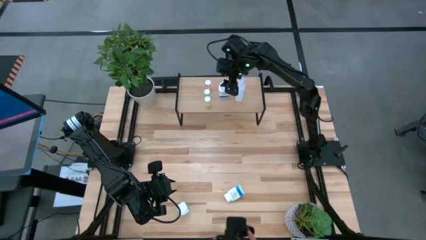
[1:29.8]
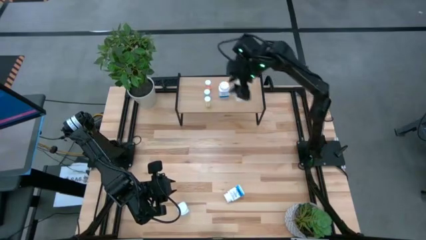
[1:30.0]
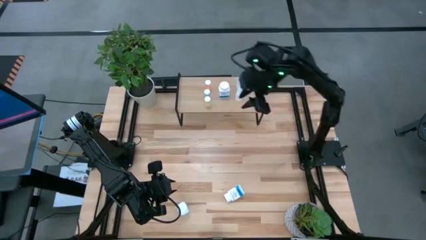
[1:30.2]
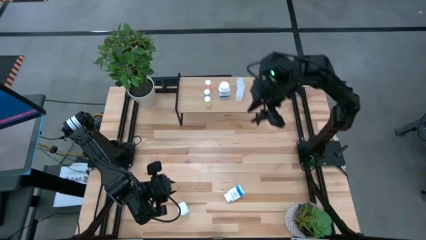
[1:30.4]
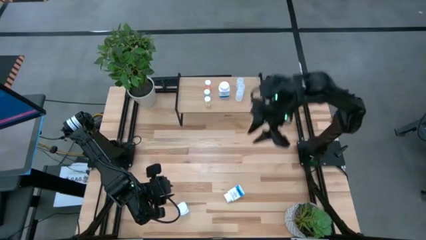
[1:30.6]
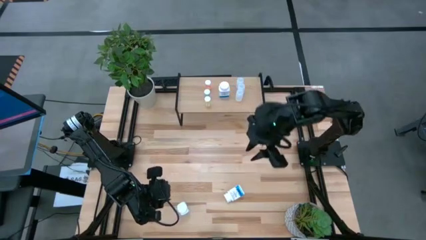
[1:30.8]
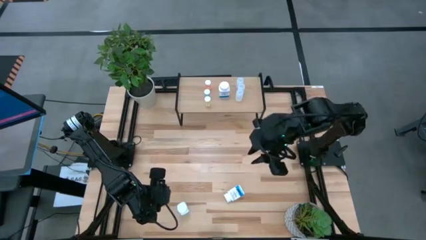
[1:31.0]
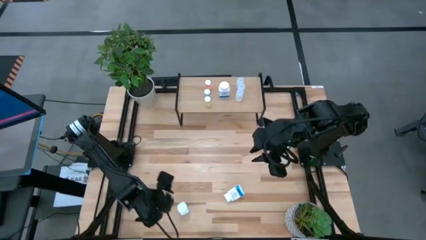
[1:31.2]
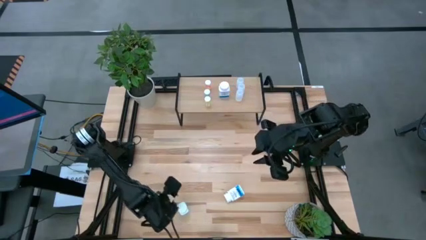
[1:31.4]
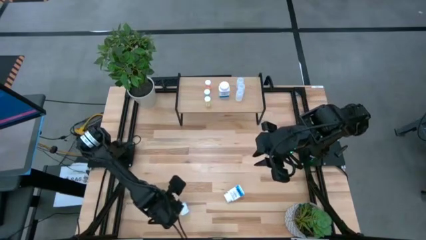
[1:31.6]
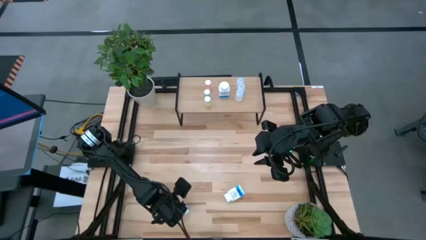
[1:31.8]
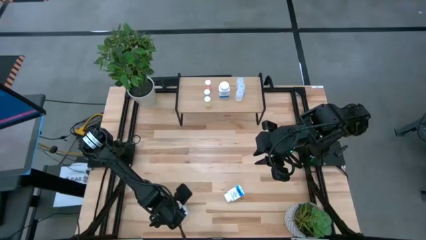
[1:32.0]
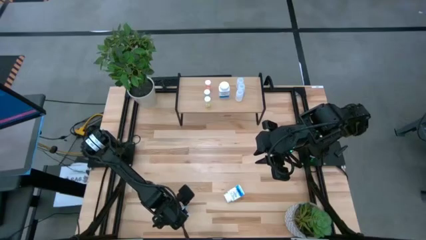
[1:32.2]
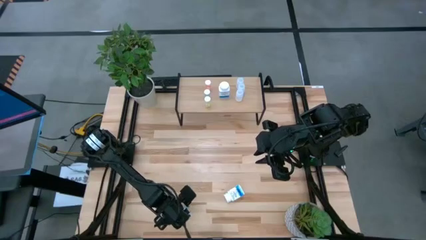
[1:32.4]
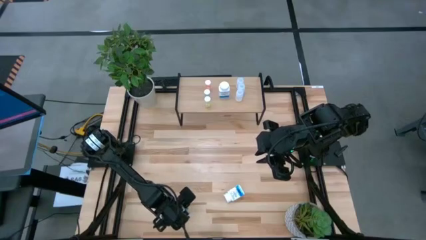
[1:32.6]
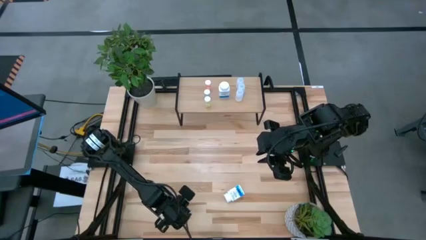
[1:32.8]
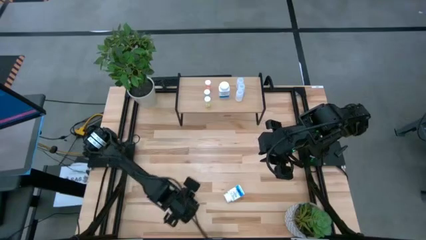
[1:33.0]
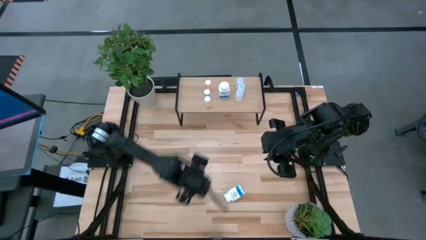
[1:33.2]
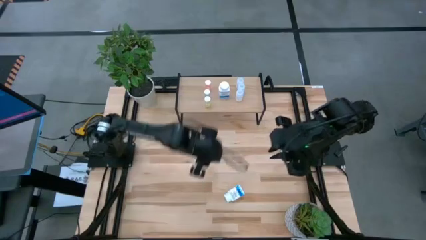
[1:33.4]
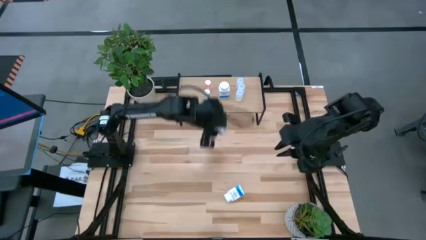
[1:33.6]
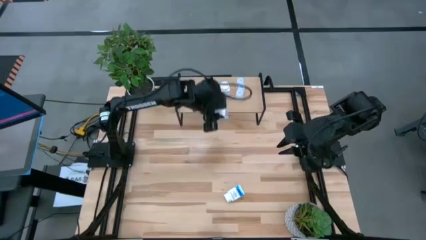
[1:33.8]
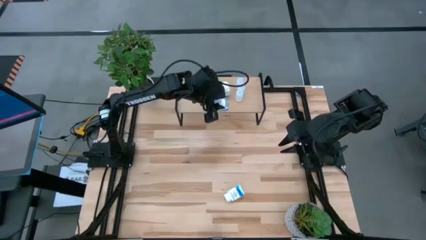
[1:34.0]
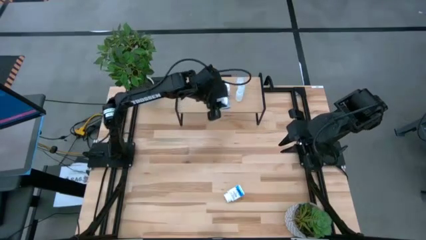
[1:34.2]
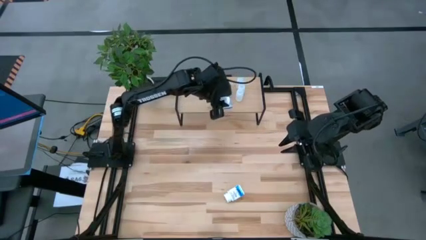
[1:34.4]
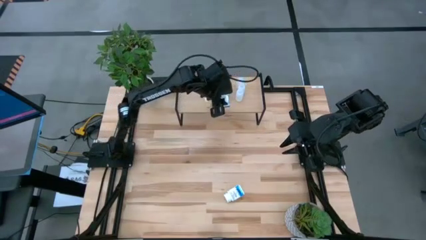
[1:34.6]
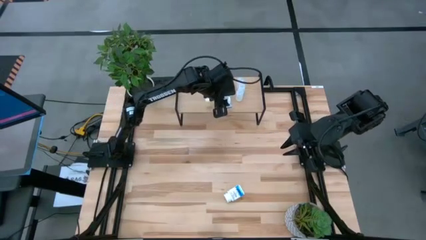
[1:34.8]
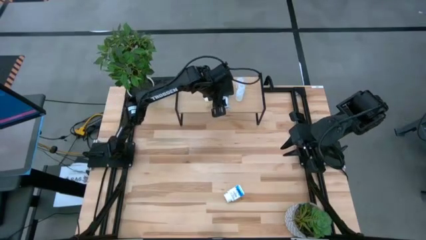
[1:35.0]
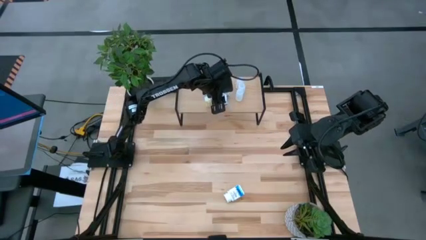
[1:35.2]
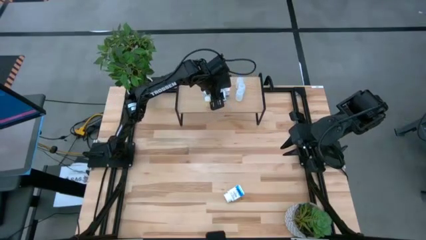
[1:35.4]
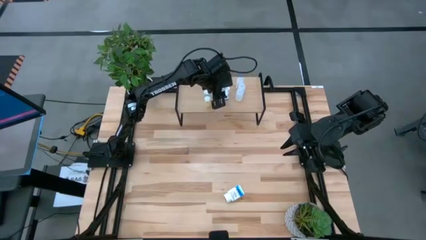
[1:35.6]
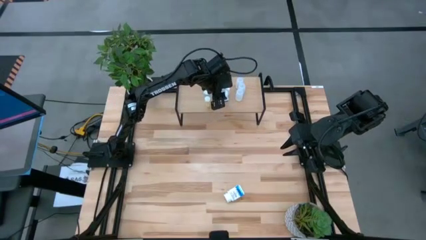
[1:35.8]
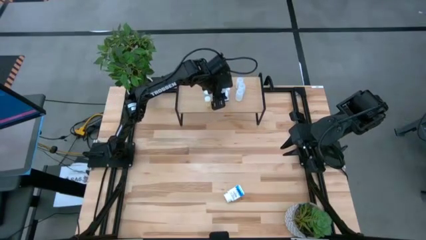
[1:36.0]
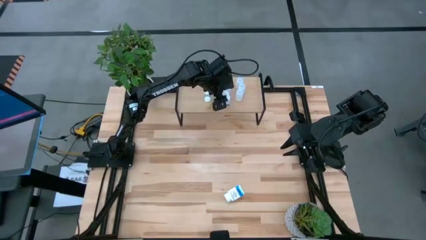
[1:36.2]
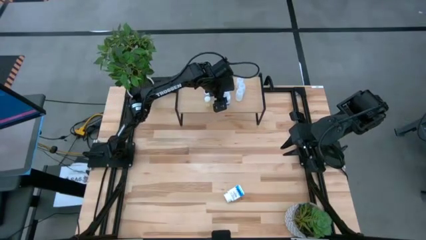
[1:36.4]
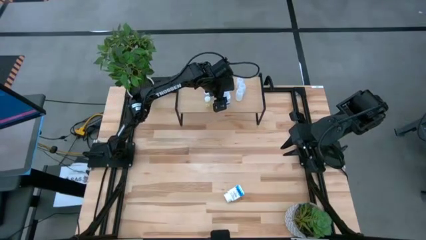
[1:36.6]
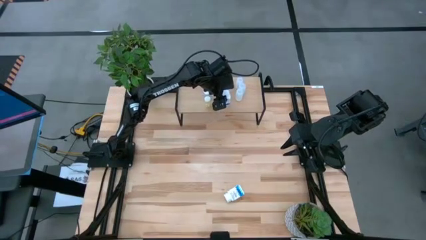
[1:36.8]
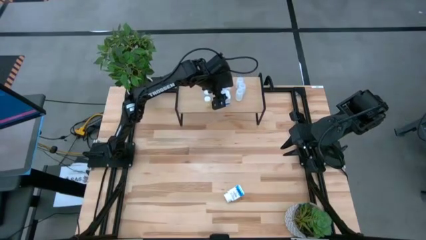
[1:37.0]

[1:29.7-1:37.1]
Task: Pick and place medicine bottles onto shelf by color
Put the left white and blue pill bottle on the shelf aligned with white and blue pill bottle

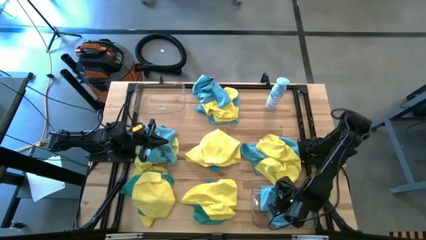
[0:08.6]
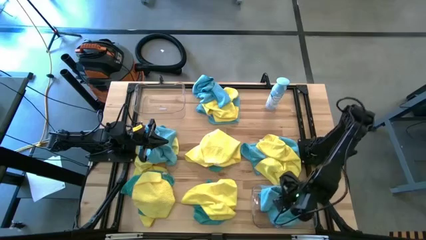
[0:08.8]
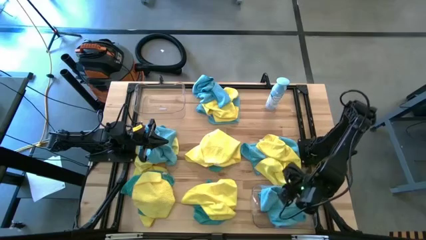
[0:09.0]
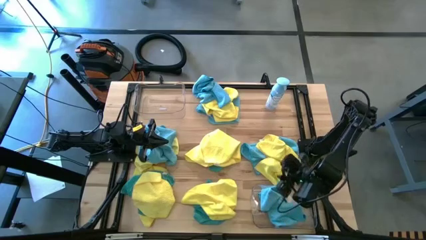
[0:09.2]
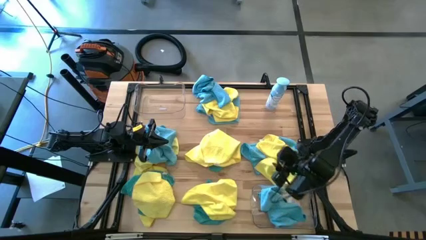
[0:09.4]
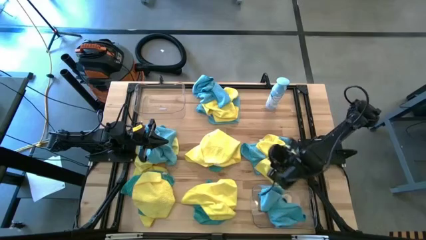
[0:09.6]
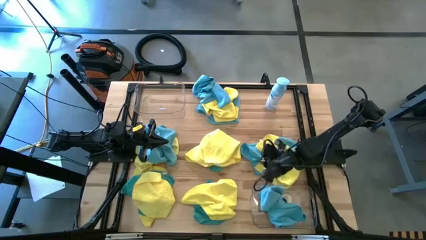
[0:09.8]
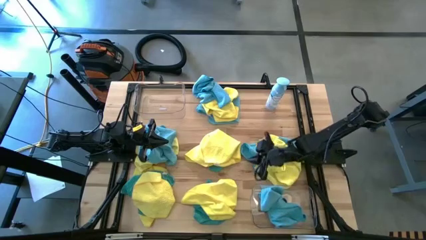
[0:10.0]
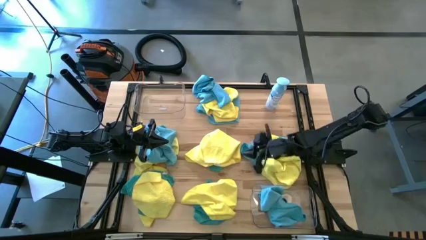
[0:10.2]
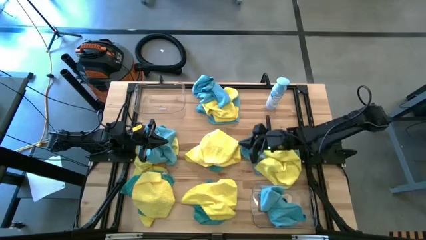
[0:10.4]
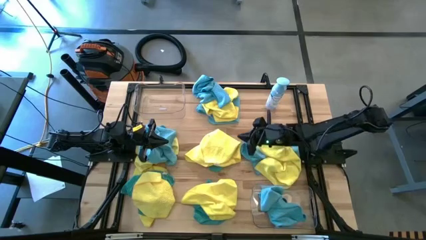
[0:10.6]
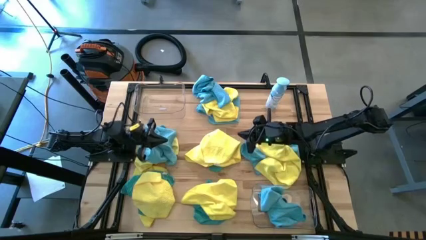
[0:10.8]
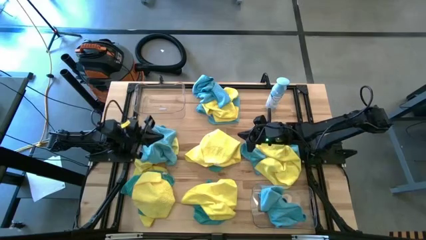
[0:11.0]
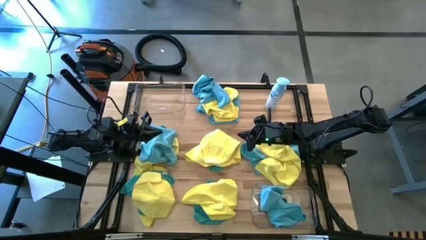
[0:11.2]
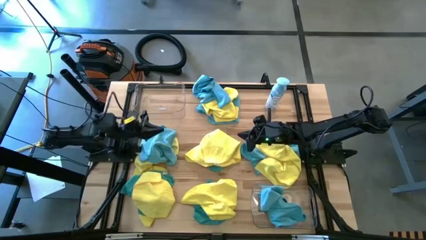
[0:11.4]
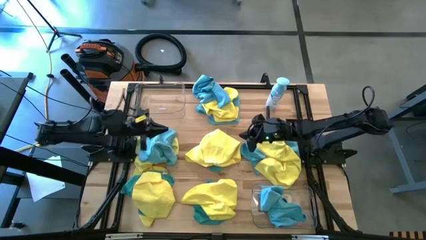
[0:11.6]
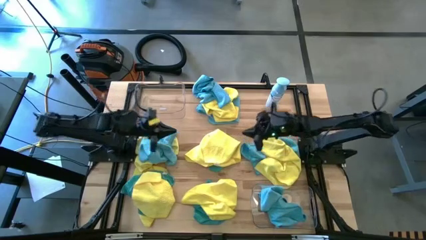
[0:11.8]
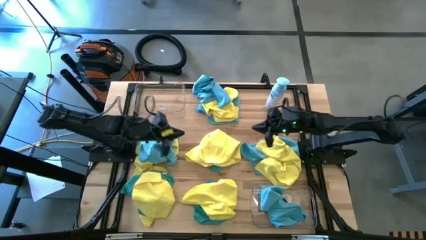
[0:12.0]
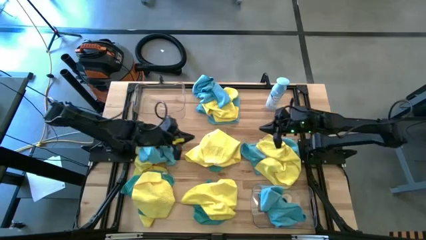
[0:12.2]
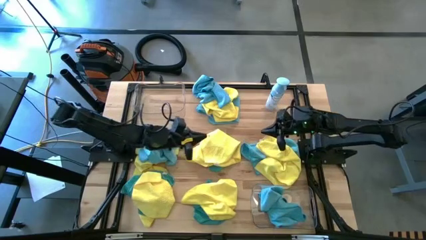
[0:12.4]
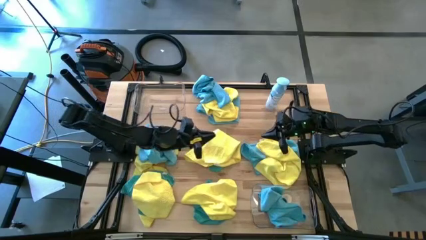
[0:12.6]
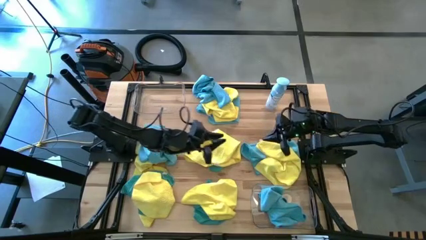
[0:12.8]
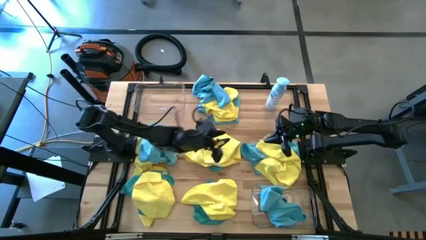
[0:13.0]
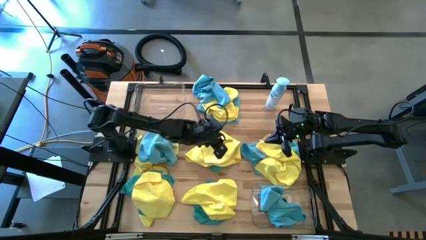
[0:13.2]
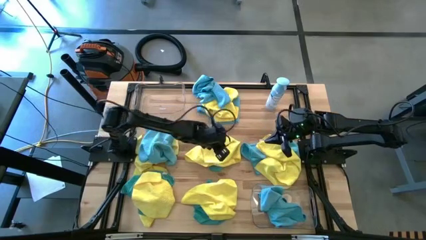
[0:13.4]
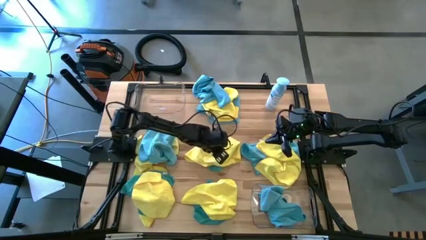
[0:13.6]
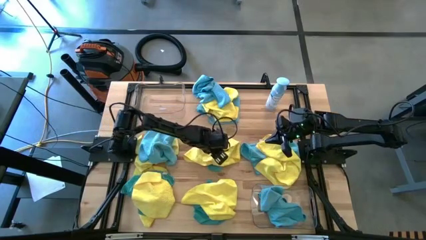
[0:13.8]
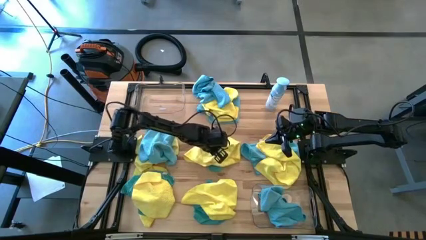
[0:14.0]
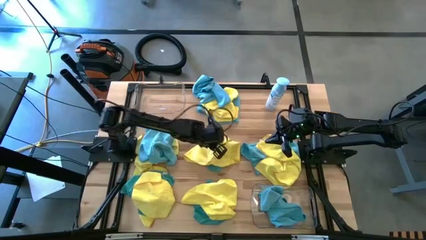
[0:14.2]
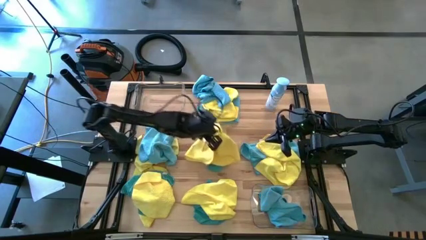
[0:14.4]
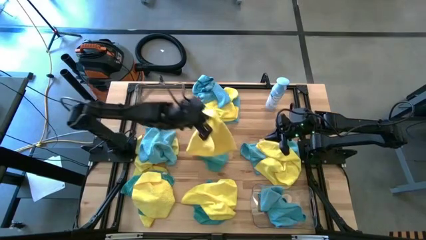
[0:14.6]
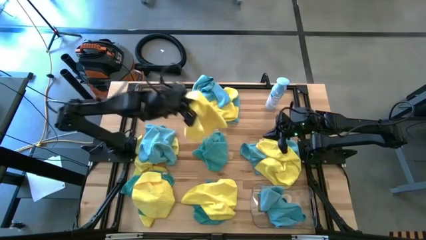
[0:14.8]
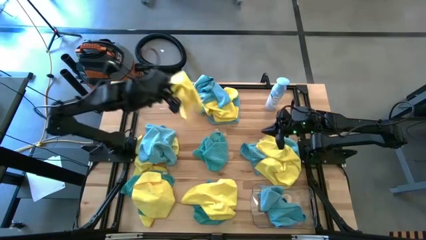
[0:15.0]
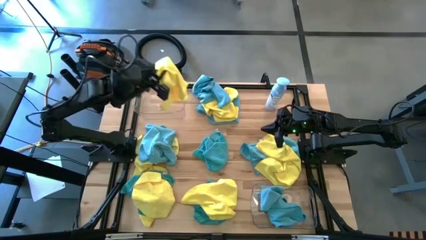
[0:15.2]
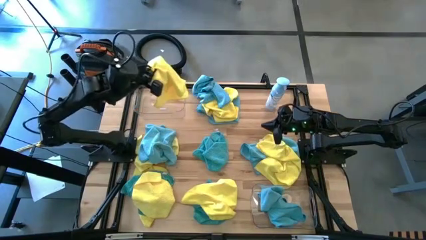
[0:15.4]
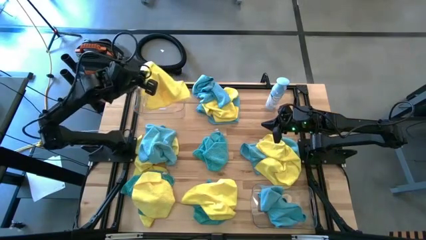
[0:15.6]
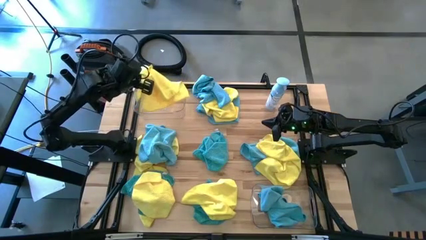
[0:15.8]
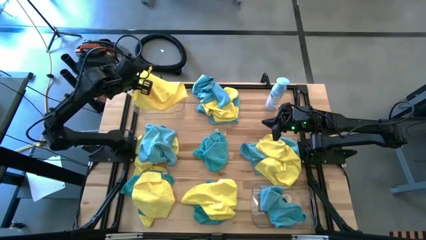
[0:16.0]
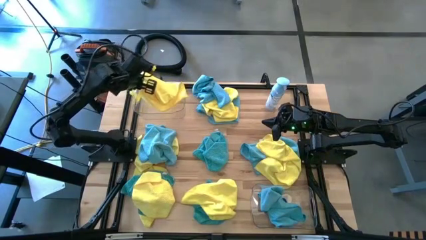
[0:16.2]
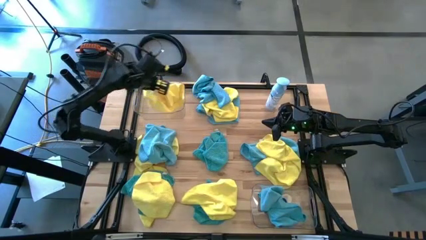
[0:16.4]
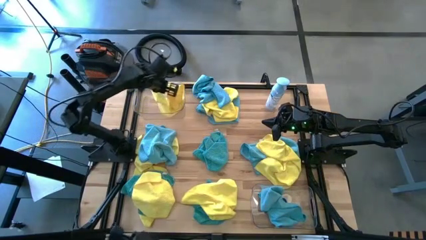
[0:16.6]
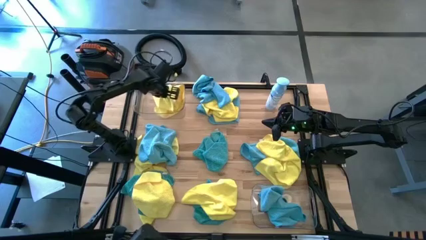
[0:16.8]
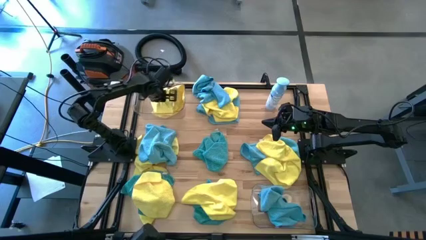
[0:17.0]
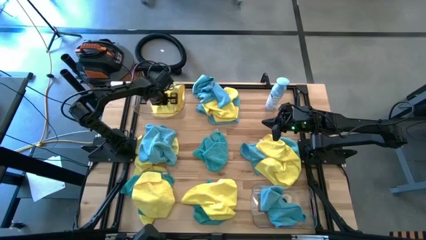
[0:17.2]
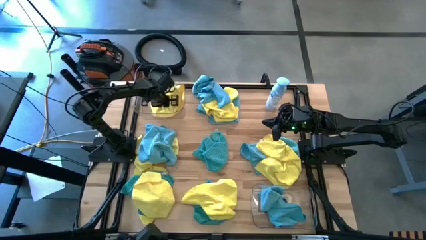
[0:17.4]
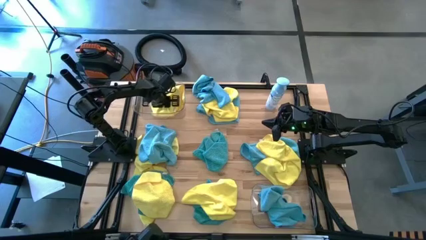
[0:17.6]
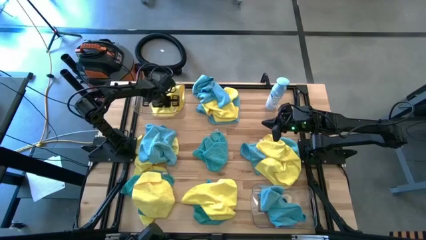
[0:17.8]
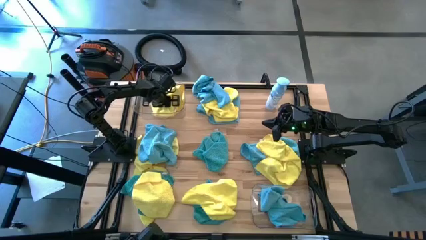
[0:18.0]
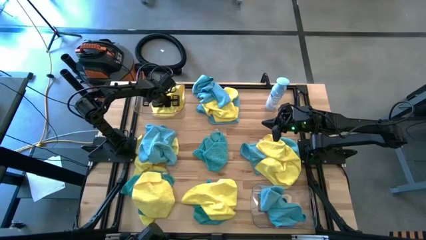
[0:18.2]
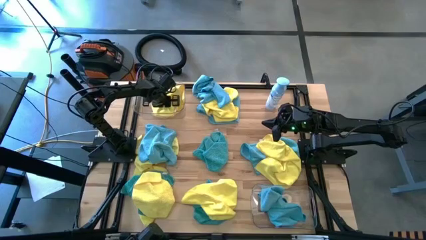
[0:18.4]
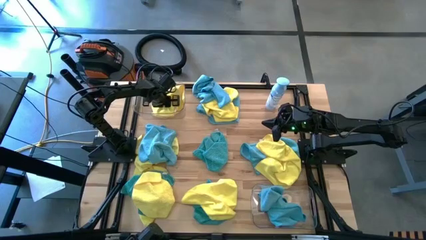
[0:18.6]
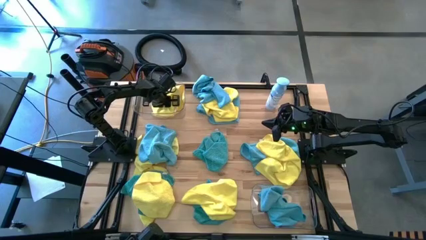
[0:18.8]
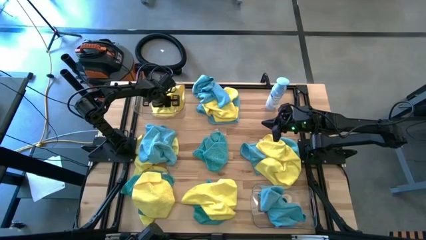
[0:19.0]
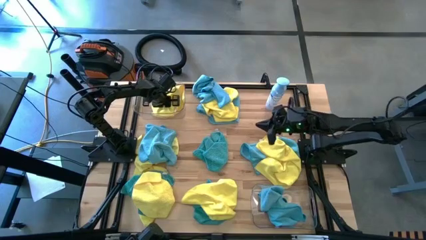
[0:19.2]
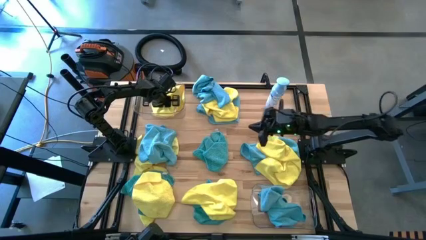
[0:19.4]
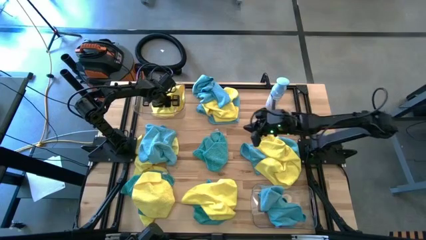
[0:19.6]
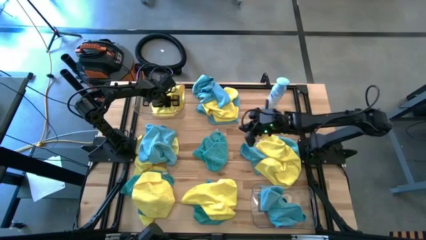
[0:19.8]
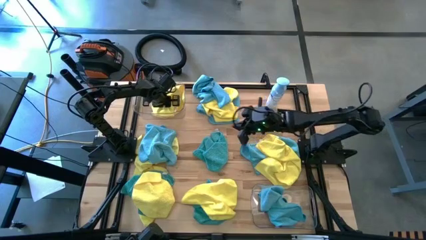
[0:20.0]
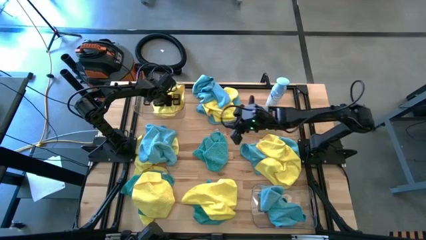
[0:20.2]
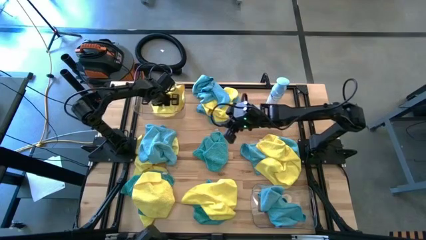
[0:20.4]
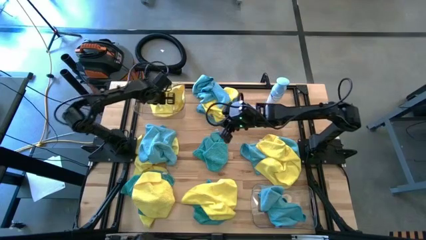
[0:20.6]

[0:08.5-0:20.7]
Task: Sort microfiber towel by color & place in baskets
Put the yellow towel into the top transparent bin
